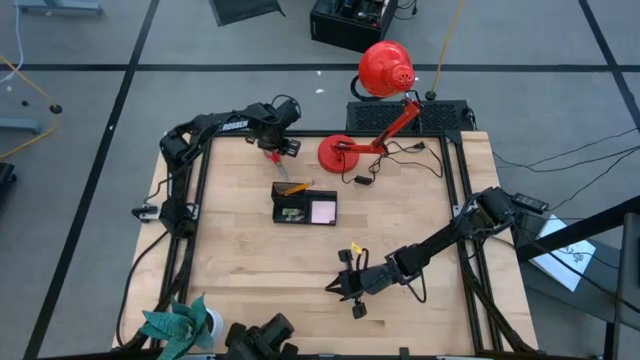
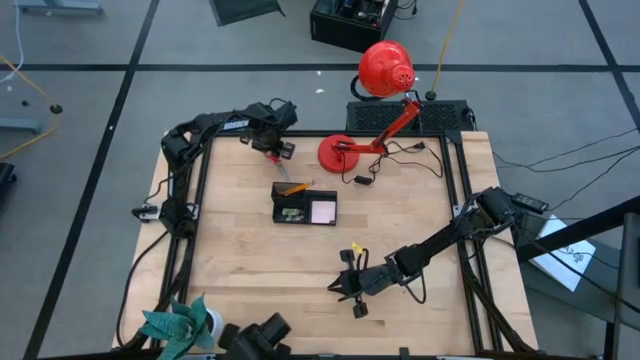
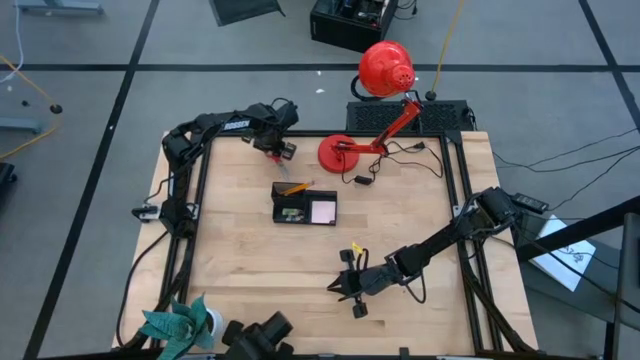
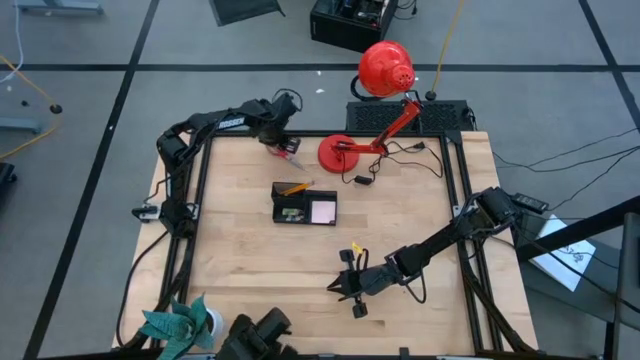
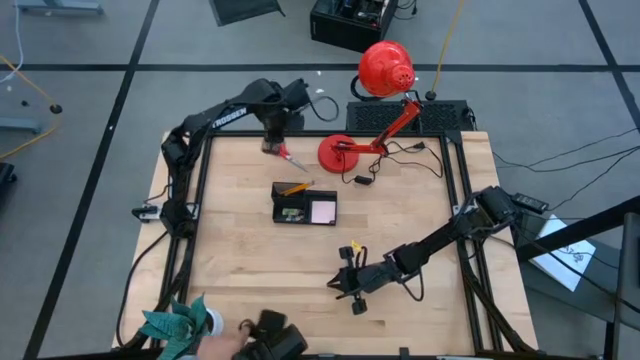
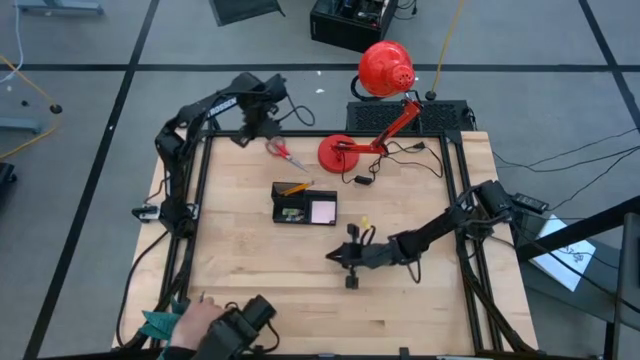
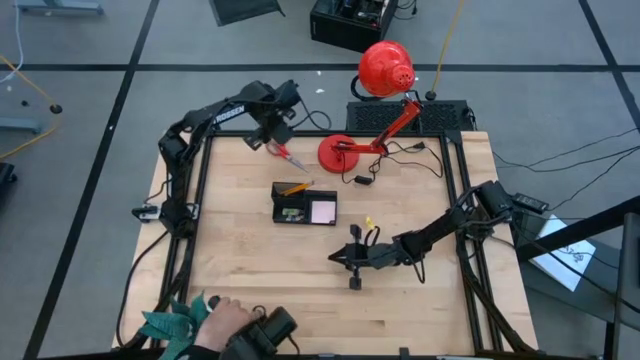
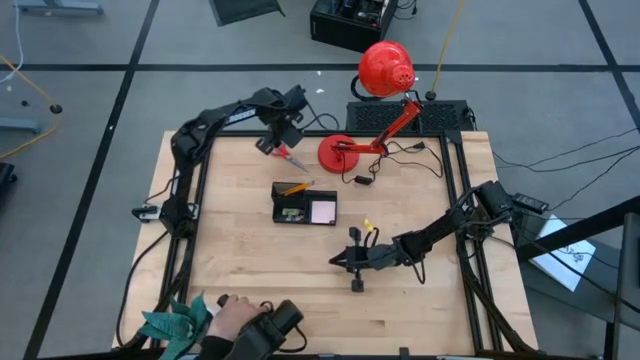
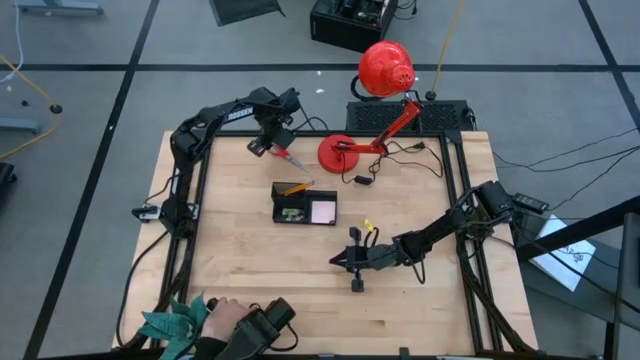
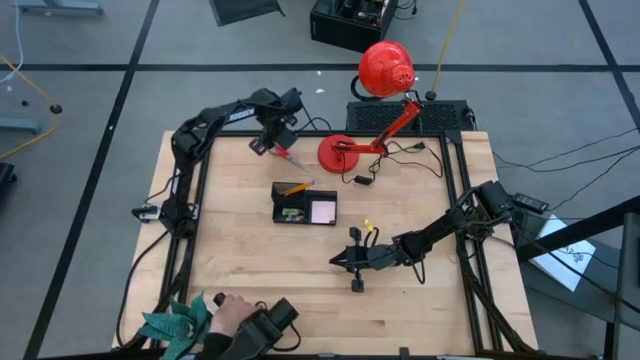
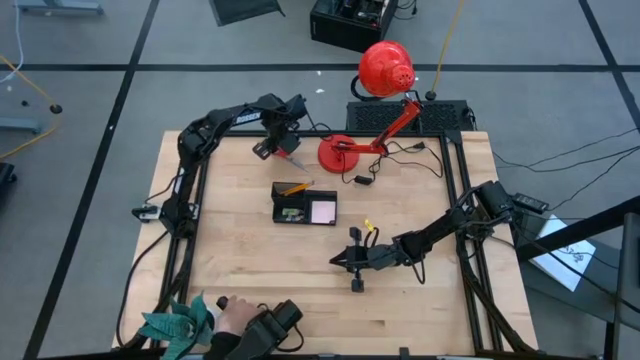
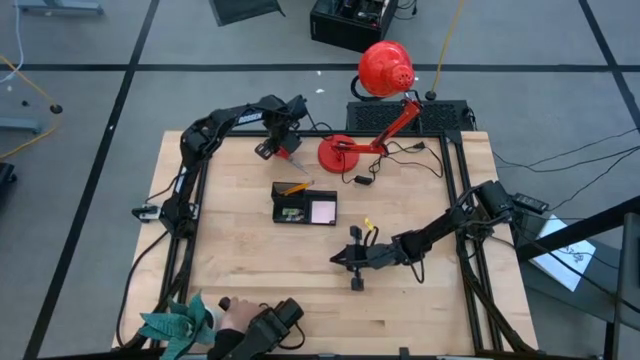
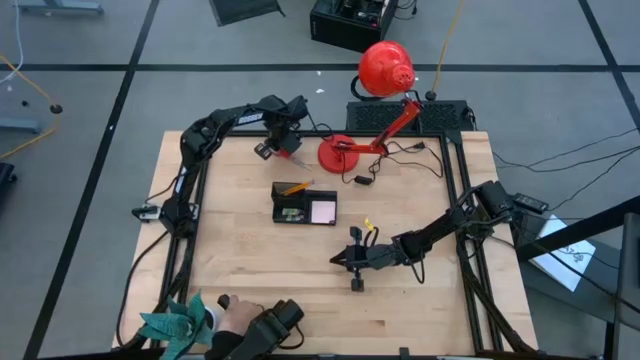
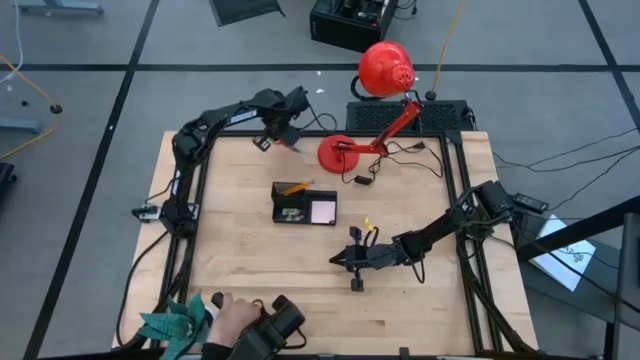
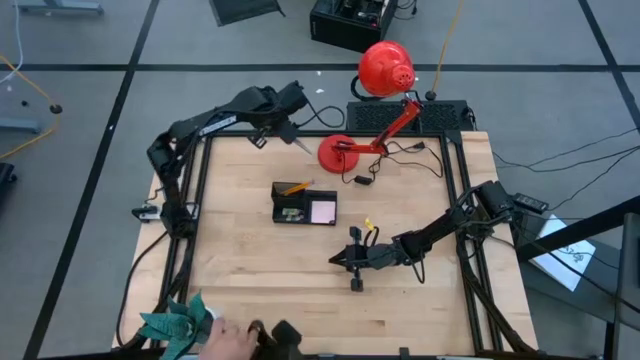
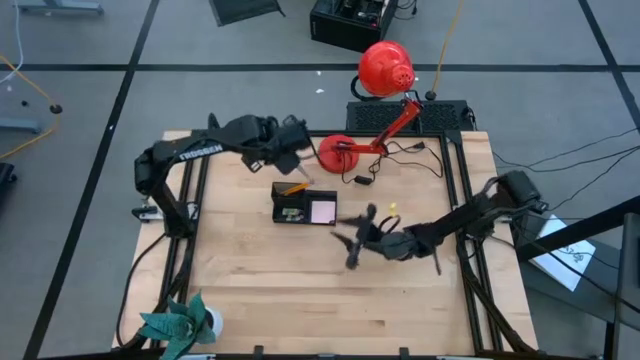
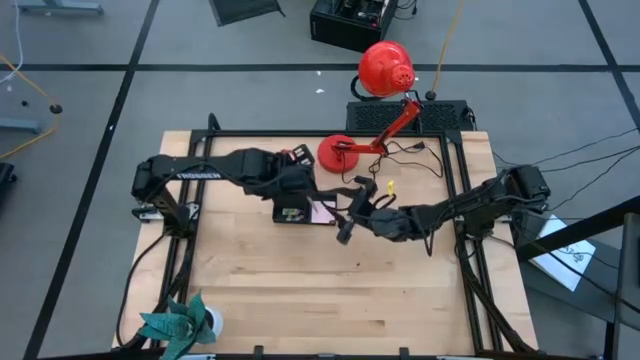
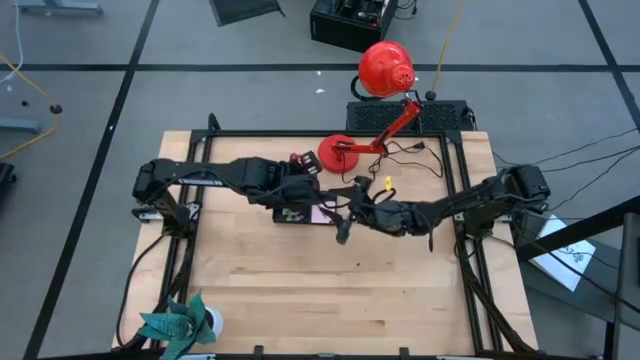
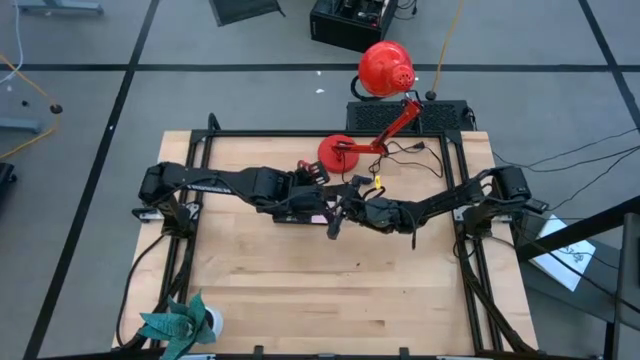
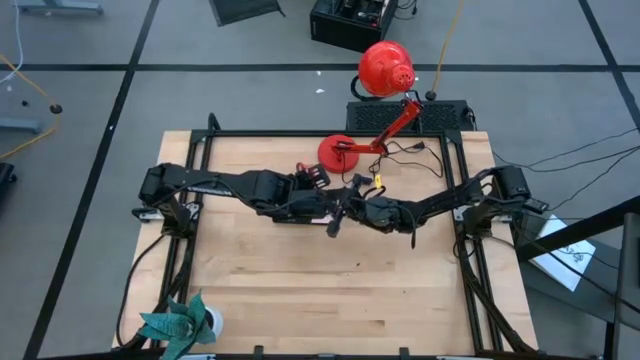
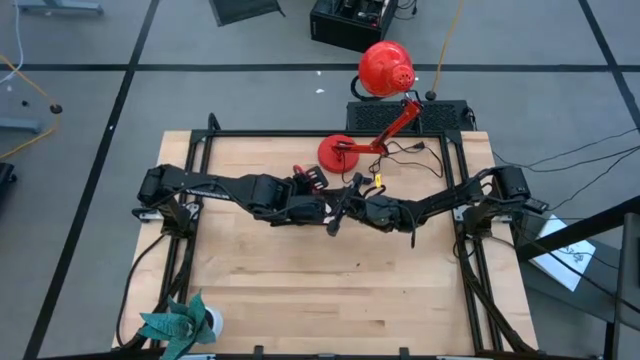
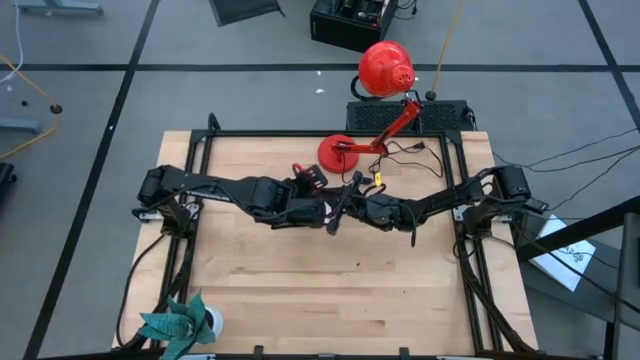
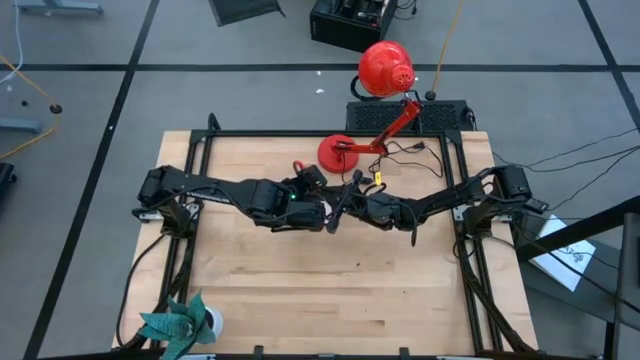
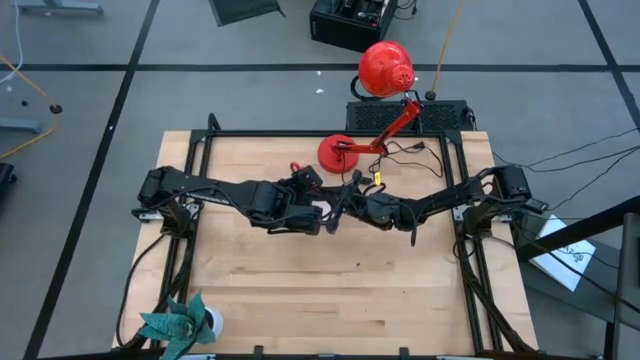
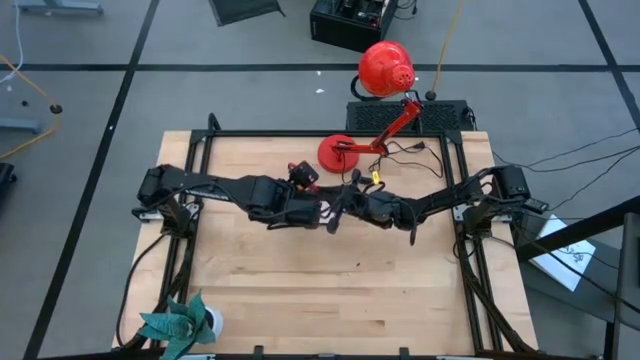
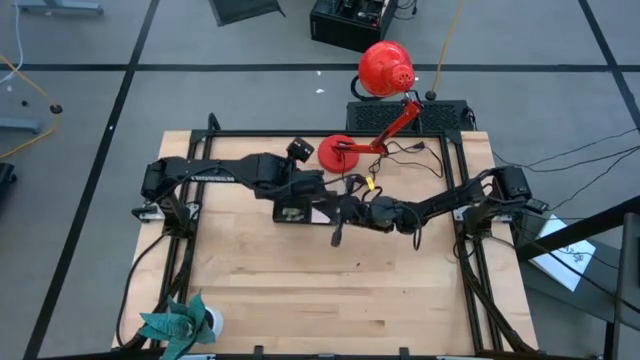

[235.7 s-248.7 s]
Task: Pick and place office supplies into organizer
Put the red scissor into the mesh desk organizer

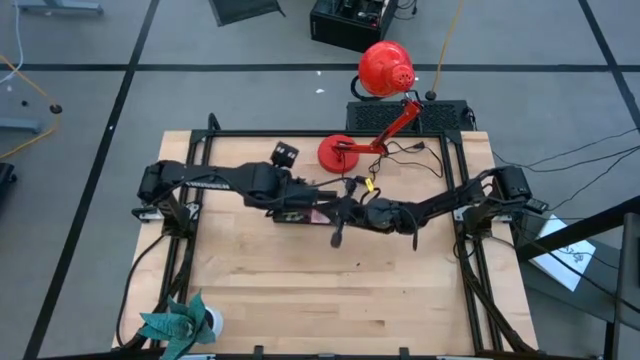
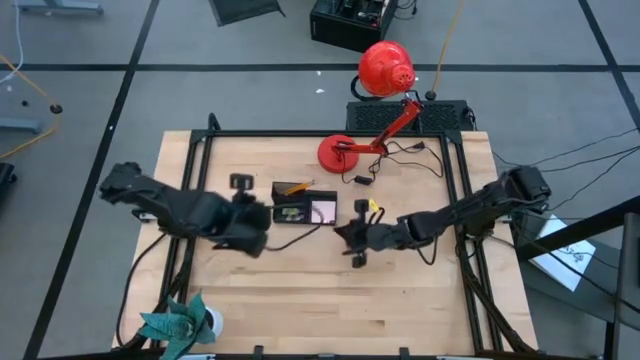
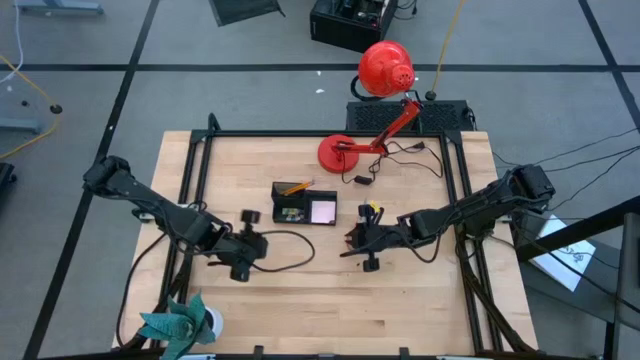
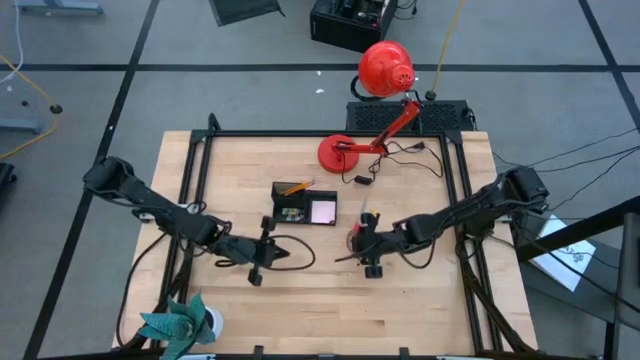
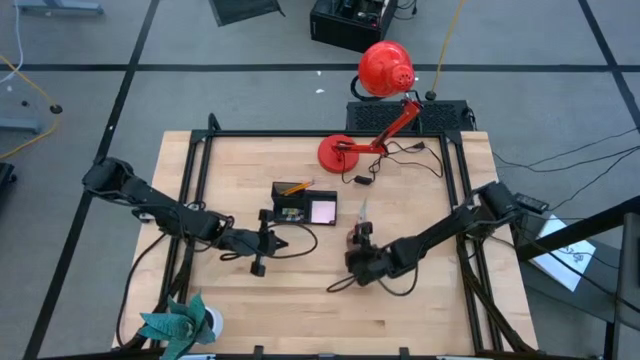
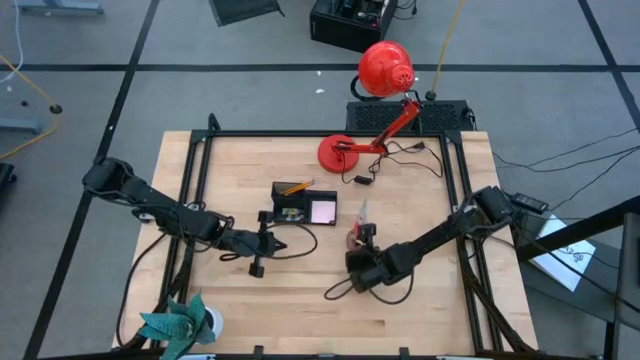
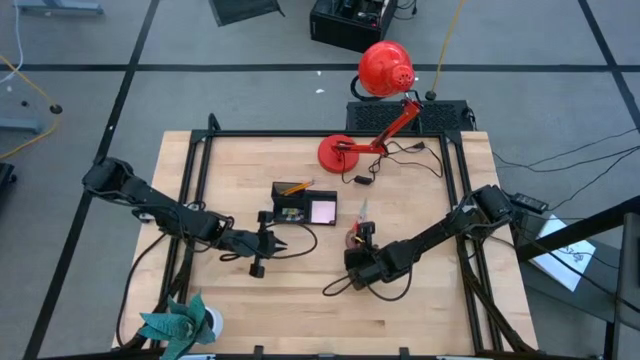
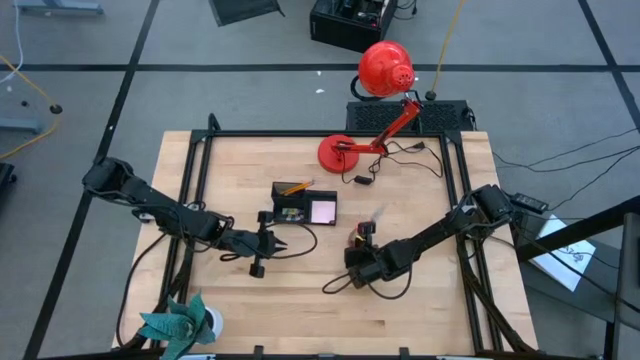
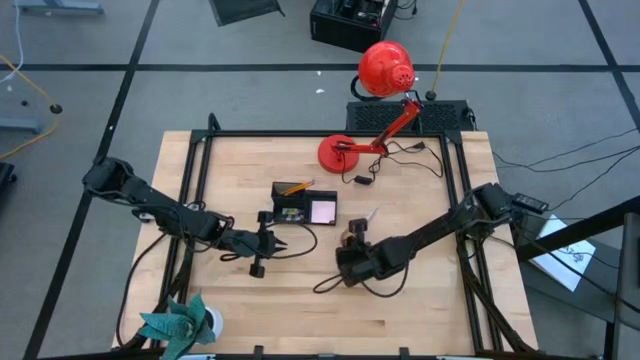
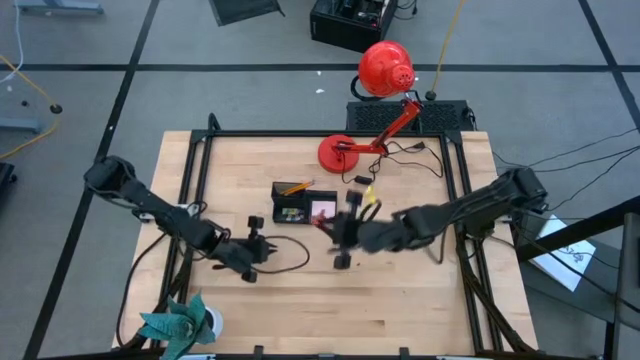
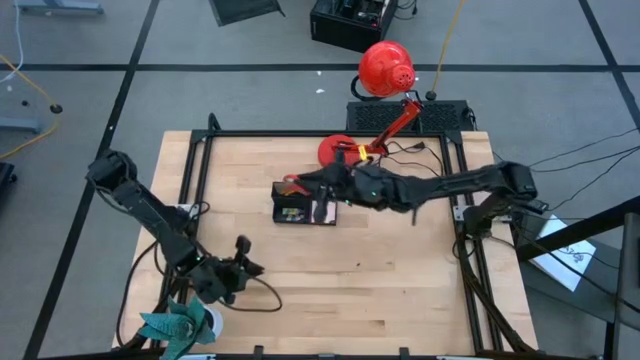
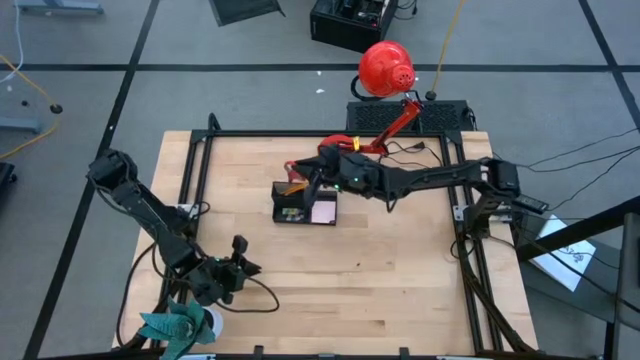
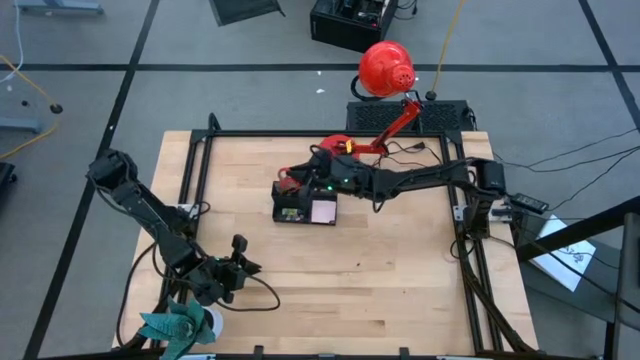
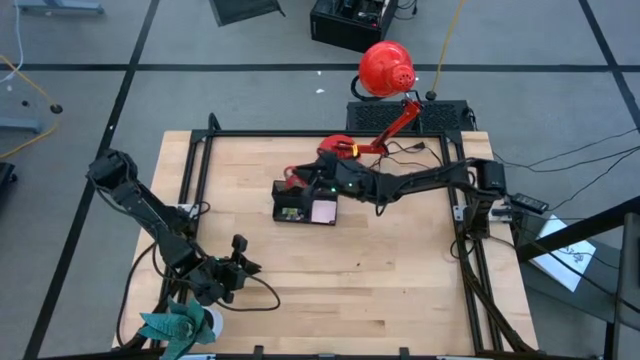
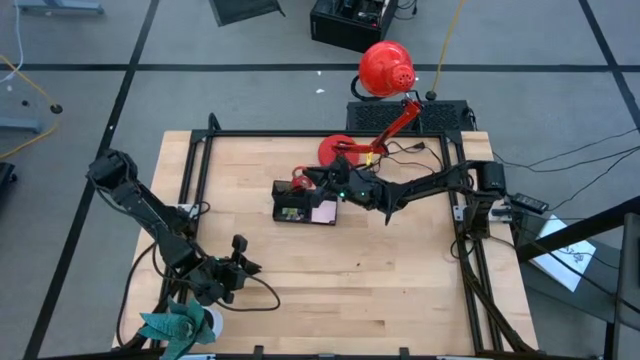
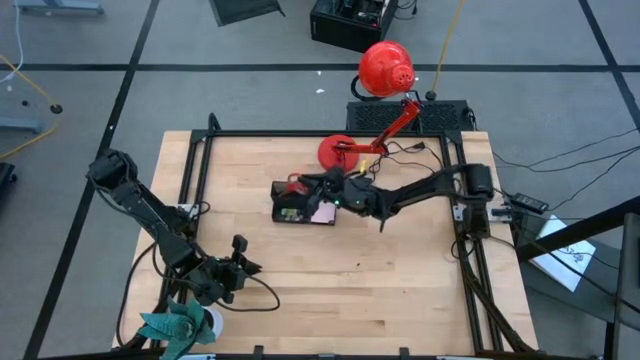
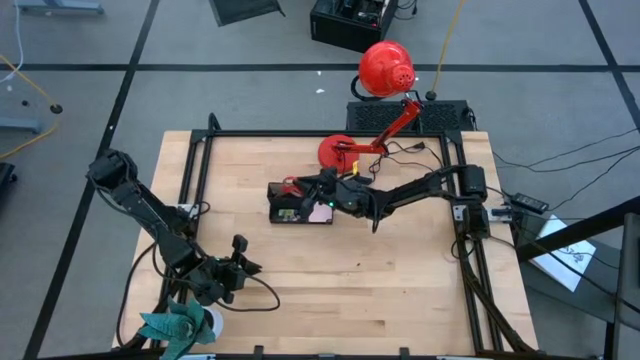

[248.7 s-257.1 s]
Put the red scissor into the mesh desk organizer

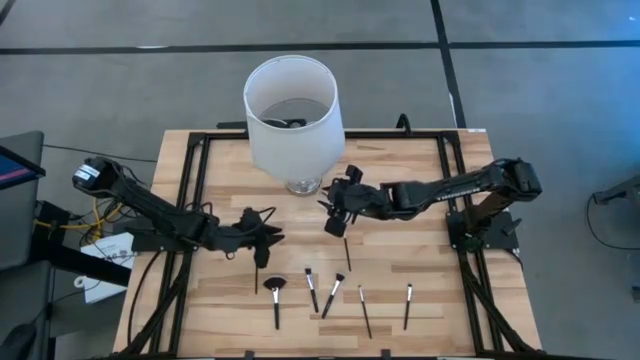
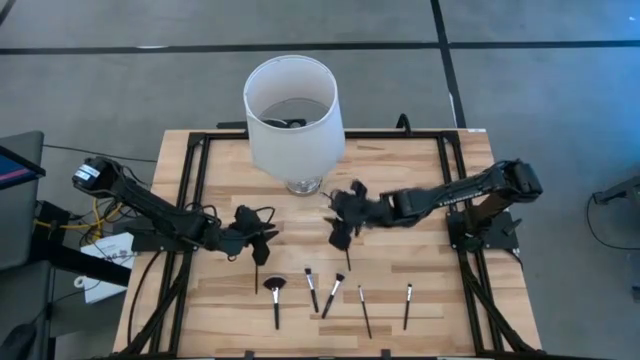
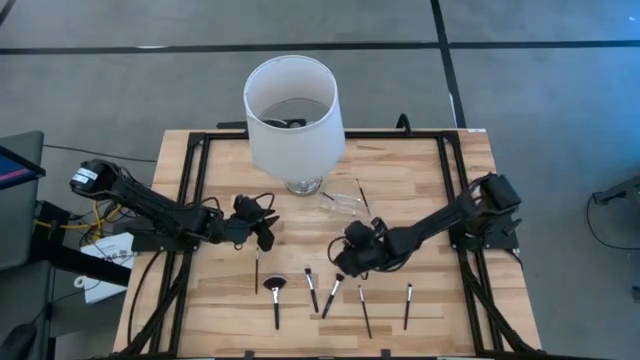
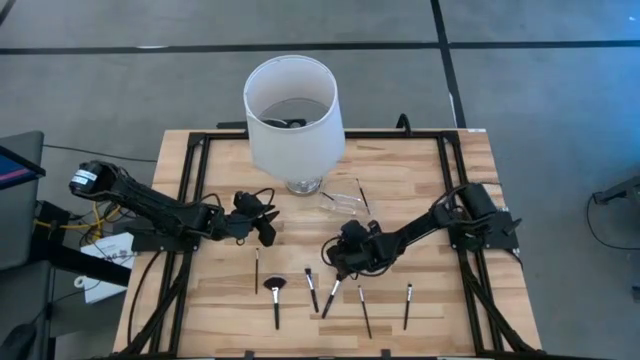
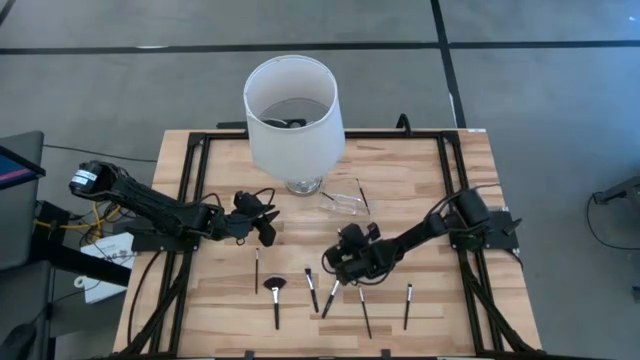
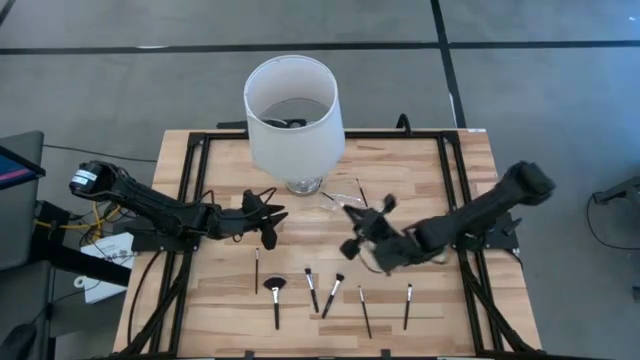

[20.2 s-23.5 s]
Task: Put items in baskets/containers
Put the white eyeshadow brush into the transparent organizer
